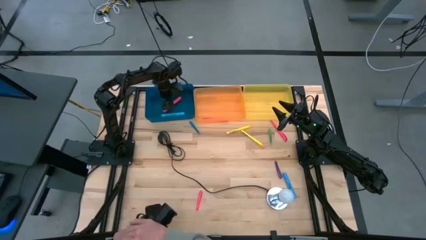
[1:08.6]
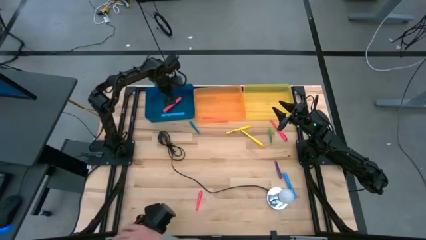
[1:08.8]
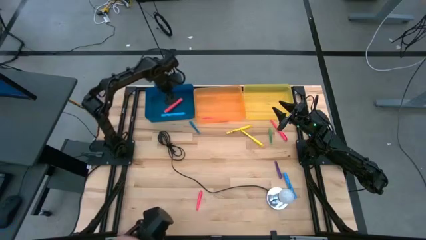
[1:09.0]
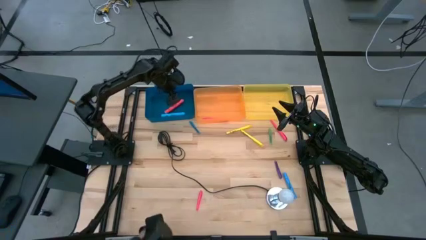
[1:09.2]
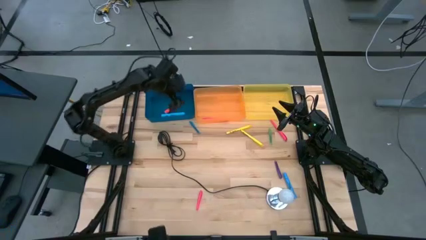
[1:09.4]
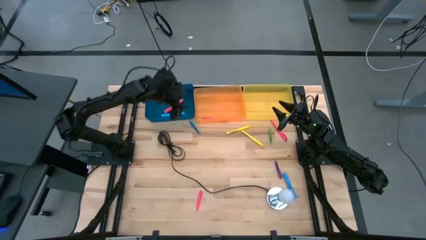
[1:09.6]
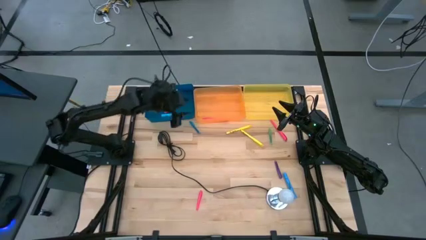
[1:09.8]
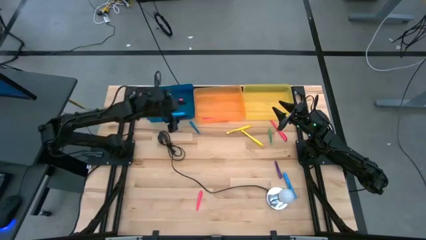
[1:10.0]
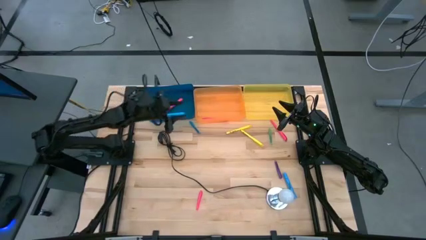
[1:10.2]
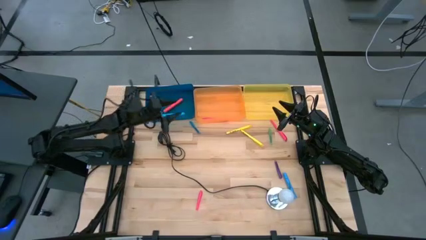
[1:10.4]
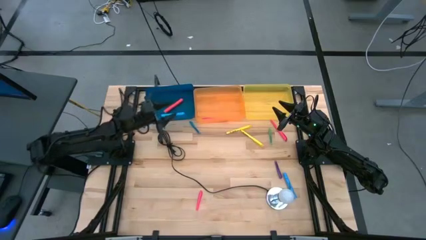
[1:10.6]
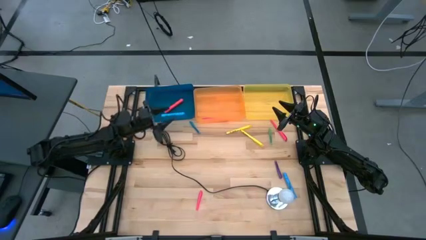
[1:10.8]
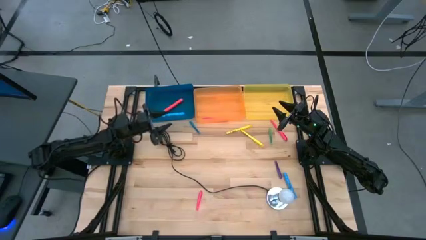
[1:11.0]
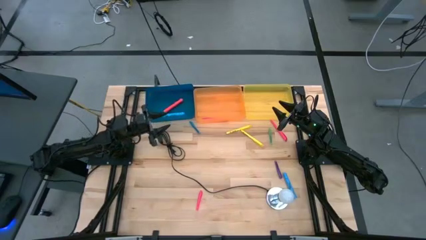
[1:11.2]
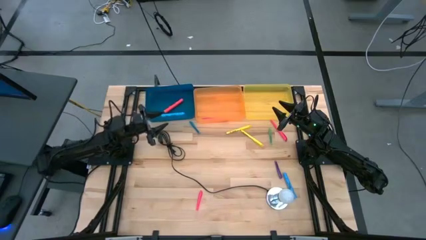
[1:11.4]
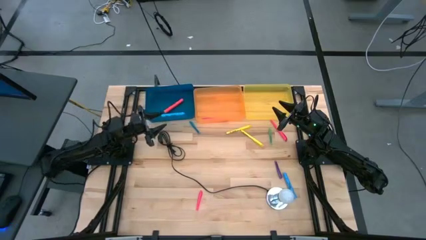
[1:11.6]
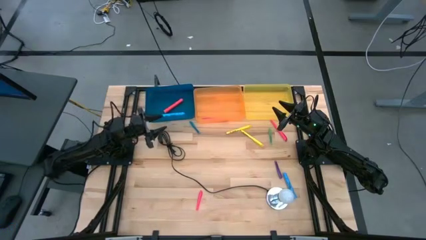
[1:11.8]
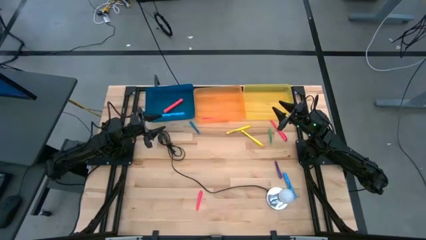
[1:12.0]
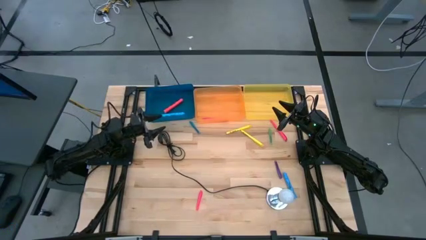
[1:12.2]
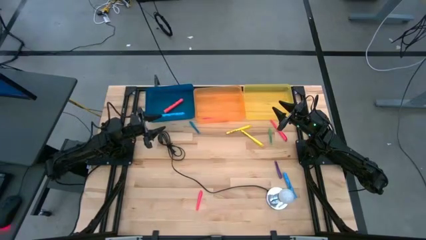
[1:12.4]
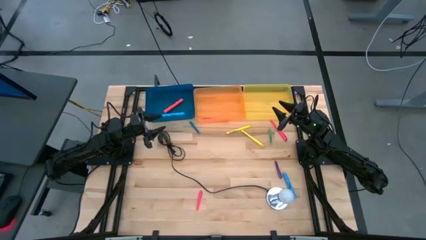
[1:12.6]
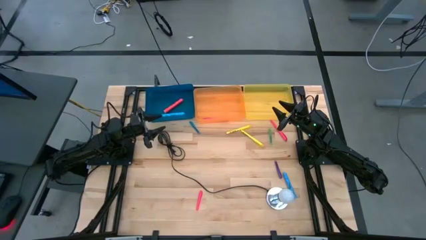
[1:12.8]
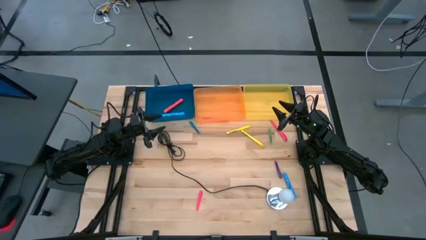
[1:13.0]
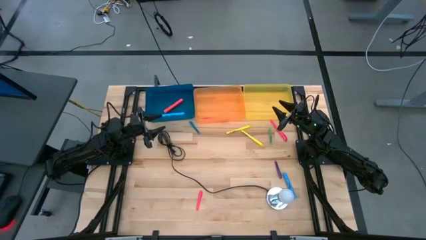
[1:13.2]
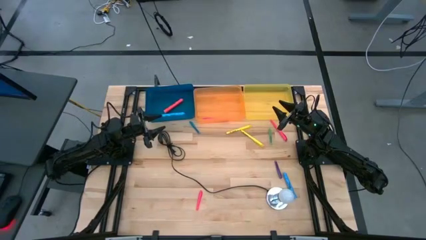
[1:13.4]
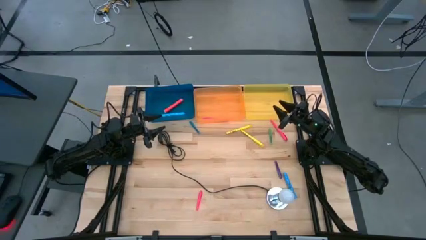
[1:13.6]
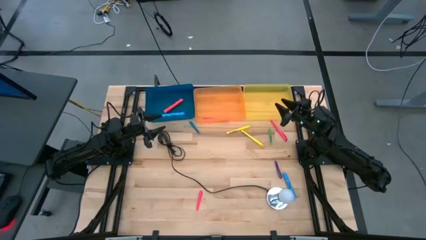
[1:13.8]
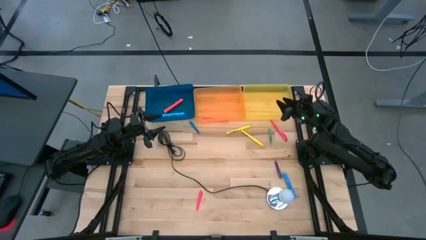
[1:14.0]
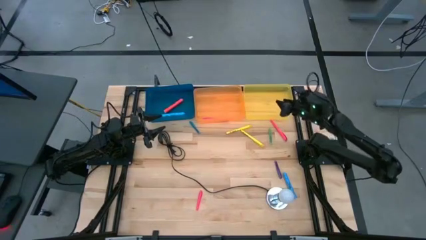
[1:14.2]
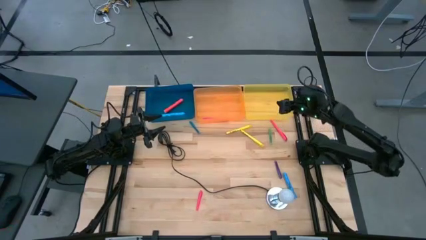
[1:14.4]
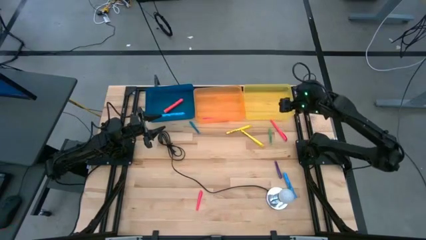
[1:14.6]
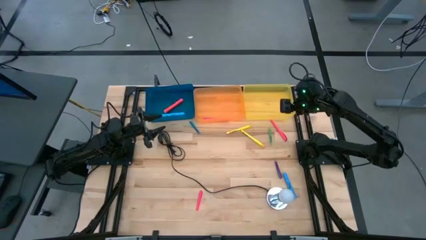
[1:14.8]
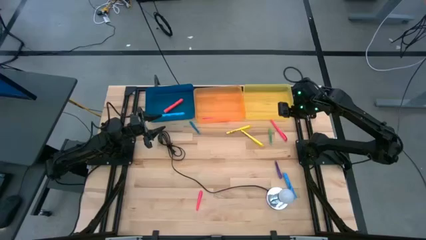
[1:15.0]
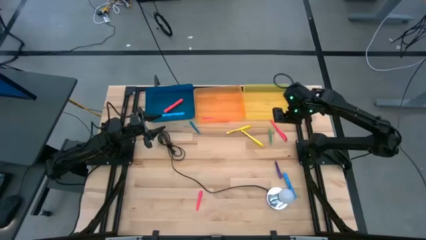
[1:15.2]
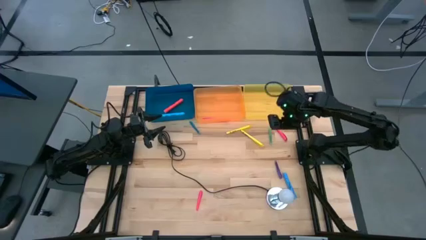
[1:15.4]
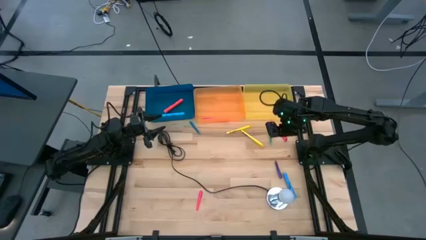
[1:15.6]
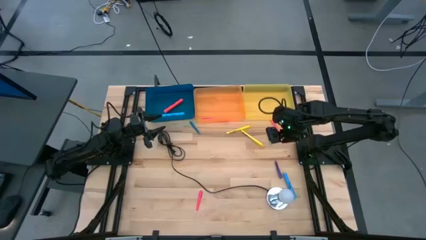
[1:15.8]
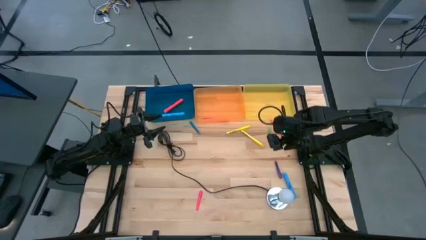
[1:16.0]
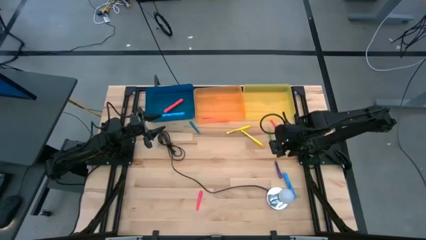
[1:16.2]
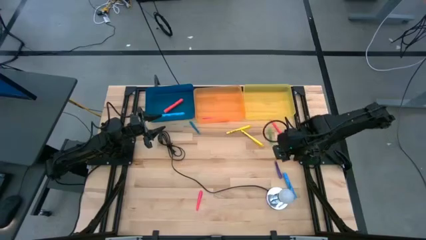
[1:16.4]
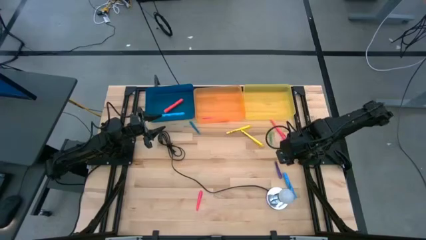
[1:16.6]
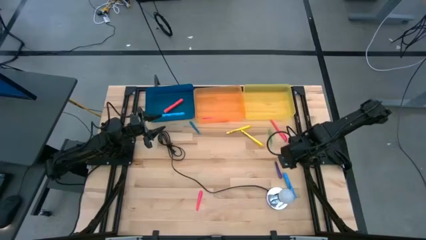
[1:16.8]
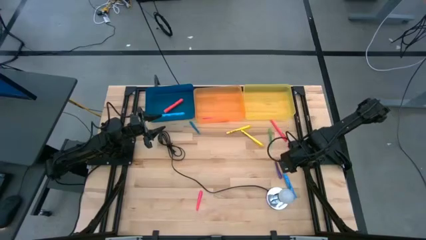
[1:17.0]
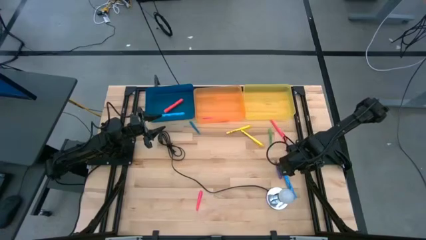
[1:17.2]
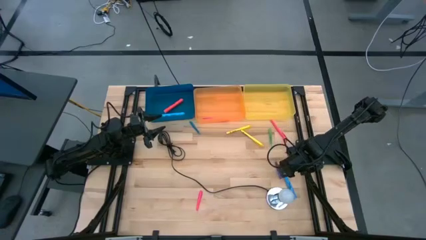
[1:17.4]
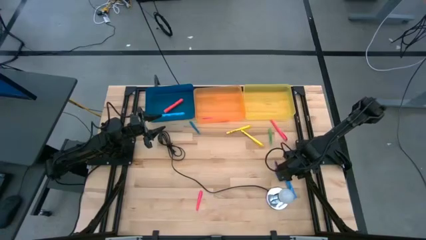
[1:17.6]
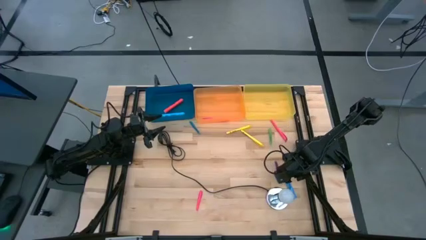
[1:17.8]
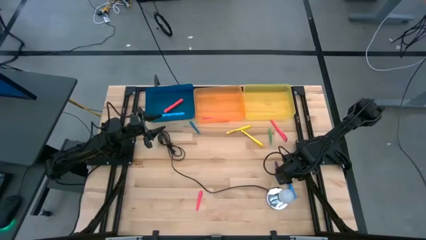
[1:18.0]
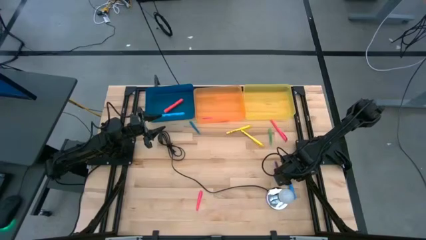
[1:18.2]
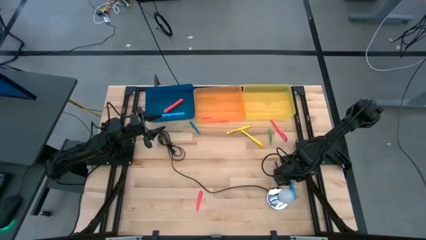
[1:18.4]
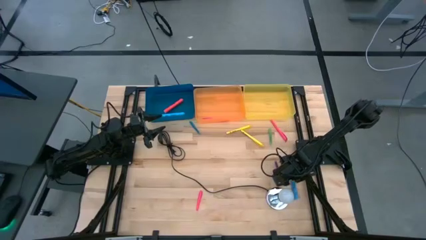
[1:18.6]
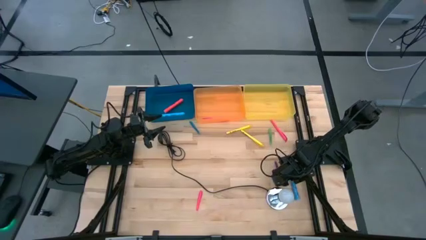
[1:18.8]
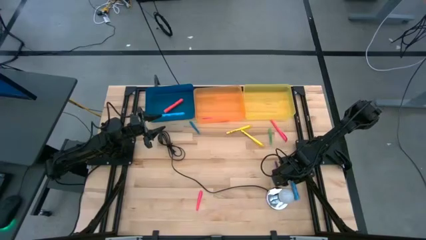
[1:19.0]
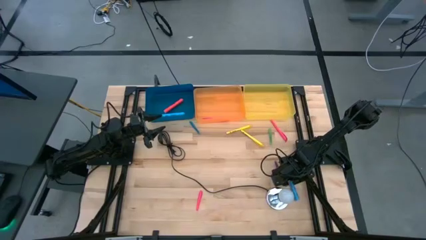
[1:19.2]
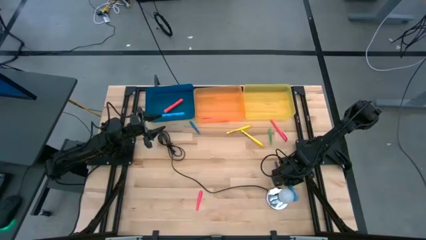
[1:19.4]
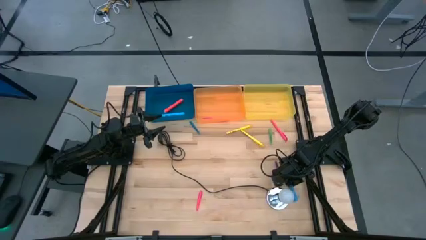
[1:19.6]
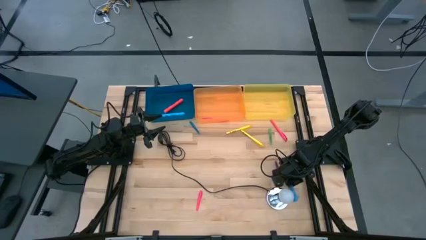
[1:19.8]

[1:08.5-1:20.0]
Task: Pick & Place Markers
Put the blue highlighter pen into the blue bin

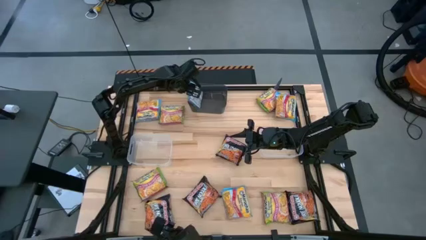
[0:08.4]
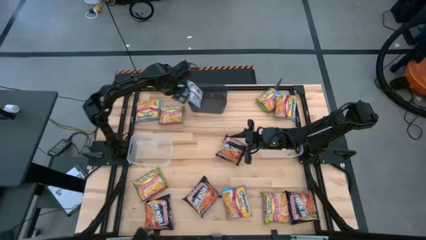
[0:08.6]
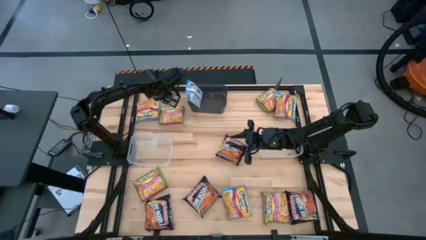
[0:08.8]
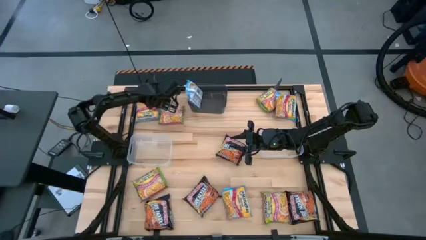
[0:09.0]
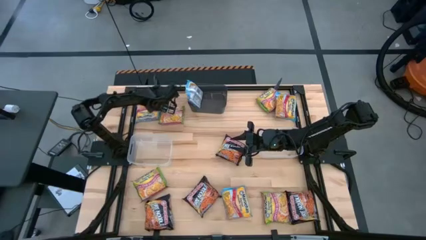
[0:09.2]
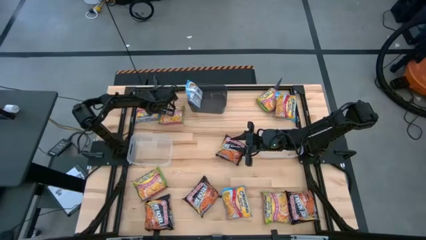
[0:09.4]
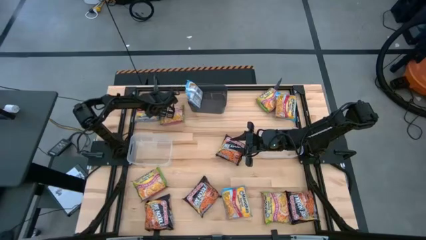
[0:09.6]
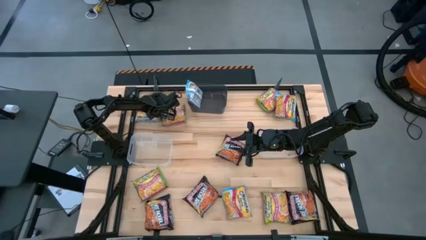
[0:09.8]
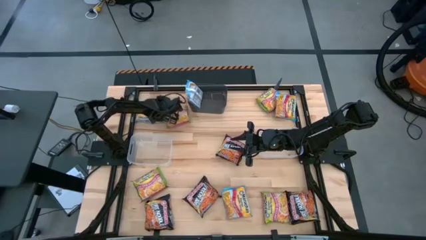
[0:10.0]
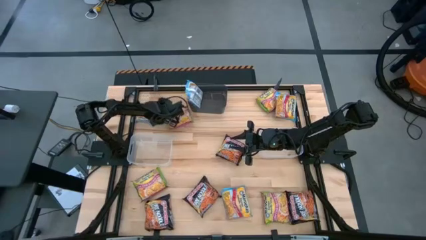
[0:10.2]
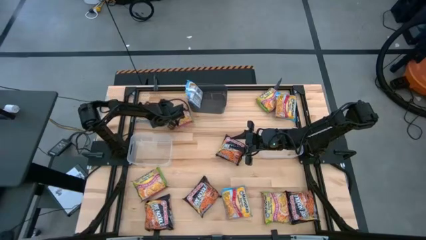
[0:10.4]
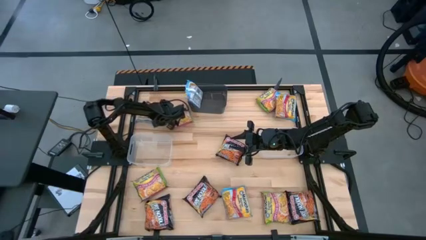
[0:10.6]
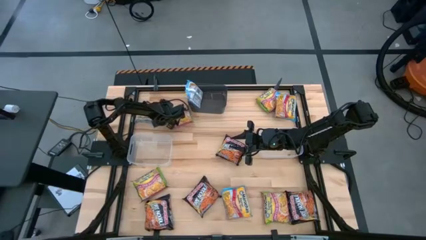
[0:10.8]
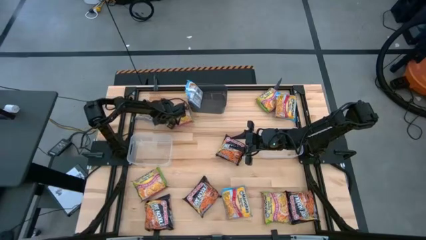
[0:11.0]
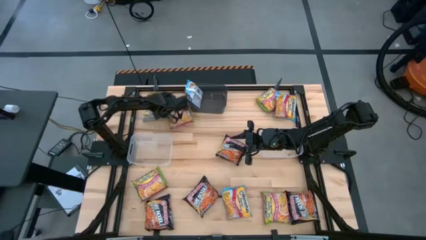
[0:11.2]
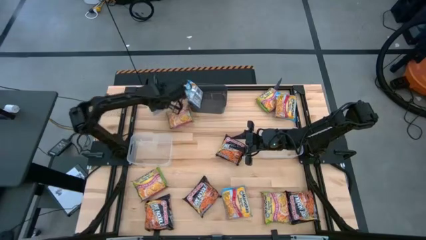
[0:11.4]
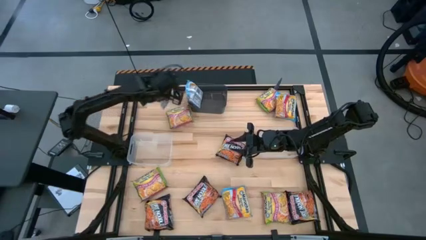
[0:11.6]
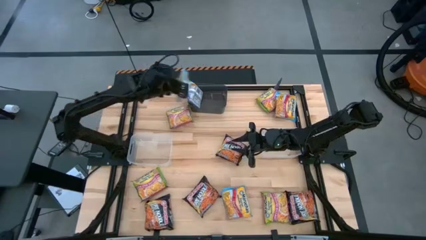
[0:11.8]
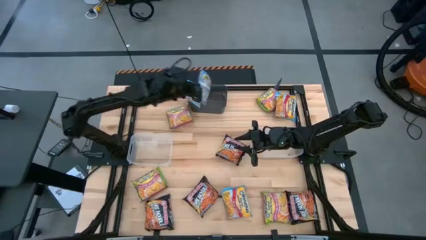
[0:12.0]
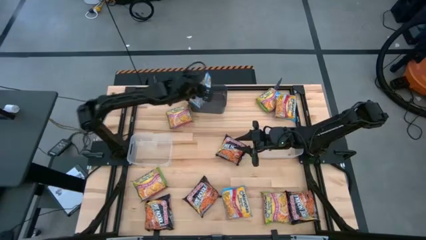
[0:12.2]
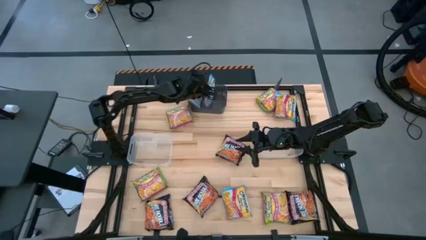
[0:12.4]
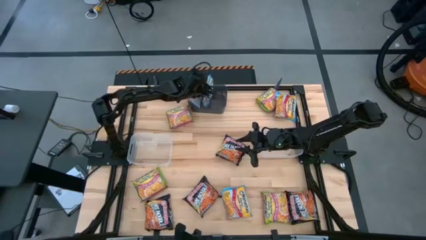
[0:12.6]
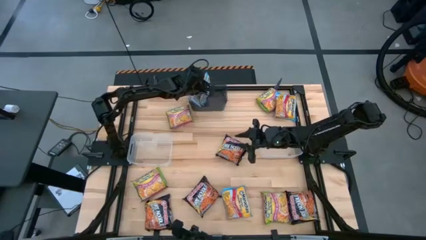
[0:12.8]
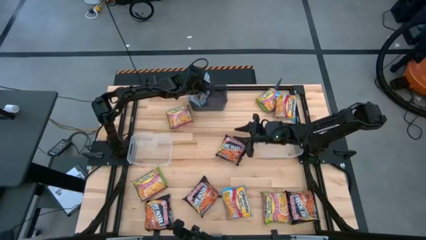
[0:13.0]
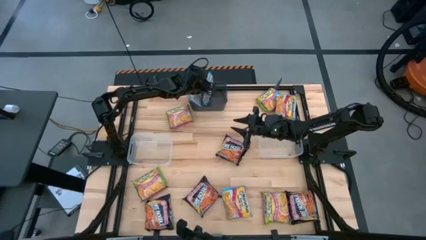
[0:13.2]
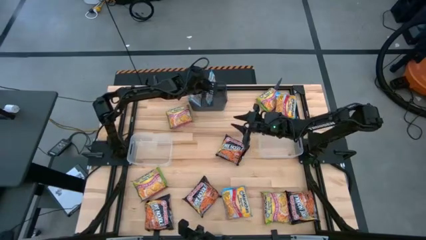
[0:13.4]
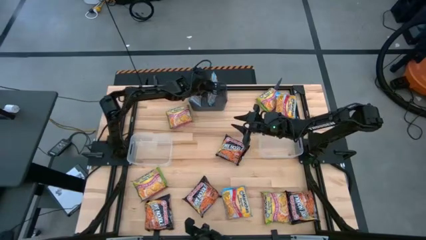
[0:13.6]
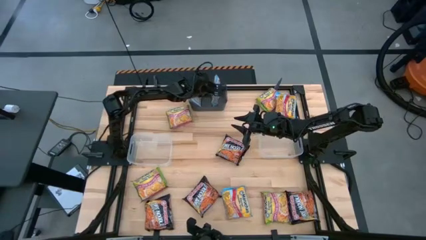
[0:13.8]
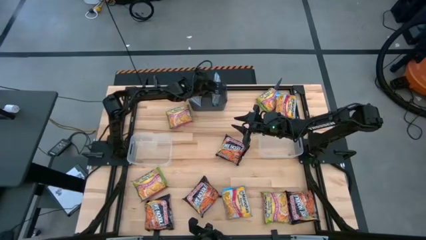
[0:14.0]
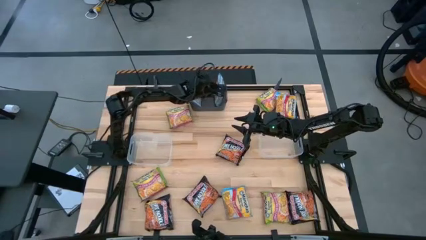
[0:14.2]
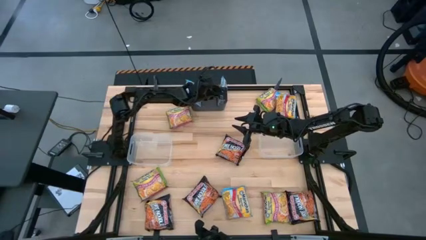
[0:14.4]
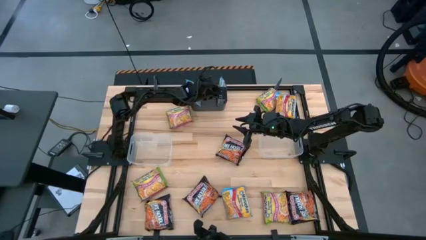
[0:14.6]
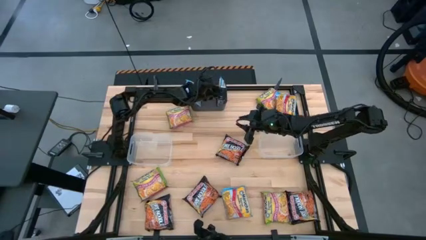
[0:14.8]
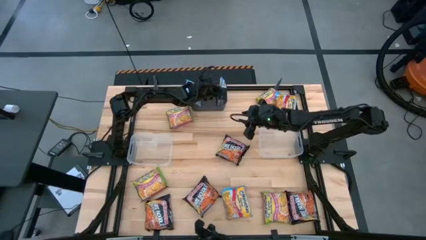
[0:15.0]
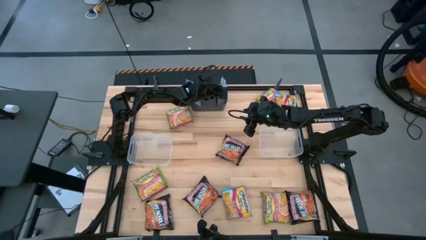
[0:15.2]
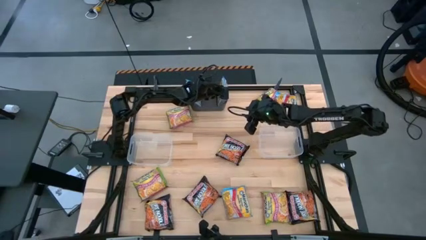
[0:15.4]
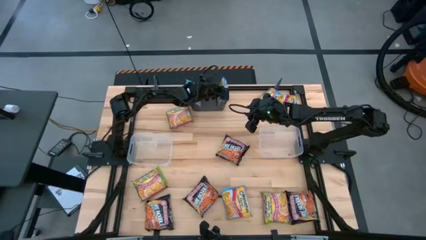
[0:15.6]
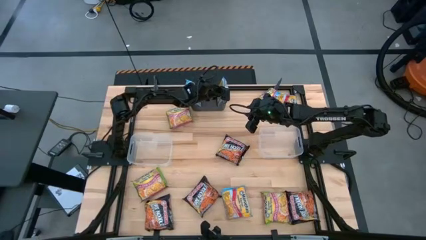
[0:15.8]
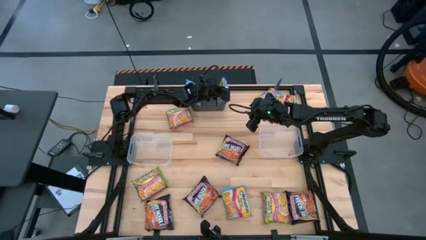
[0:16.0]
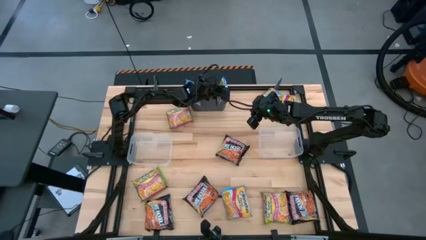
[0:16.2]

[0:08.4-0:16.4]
Task: Sort Maruchan noodles
Put the blue noodle pack into the black bin
